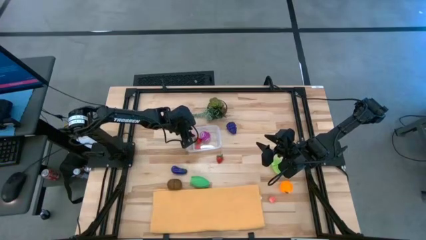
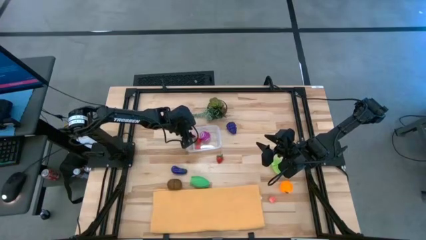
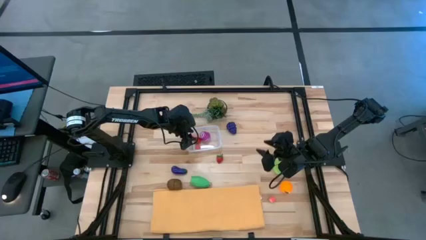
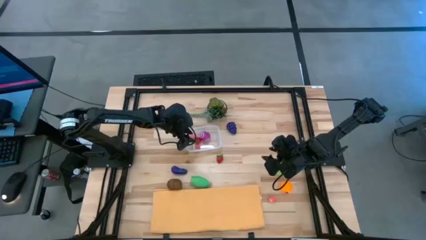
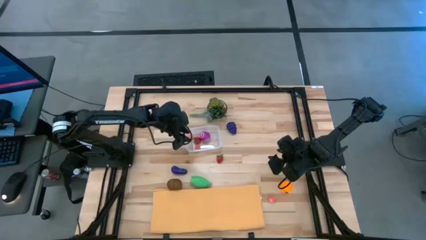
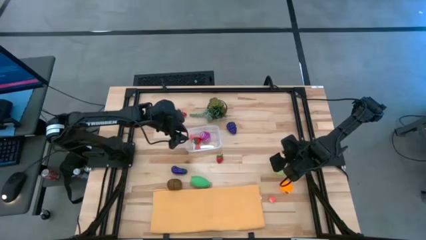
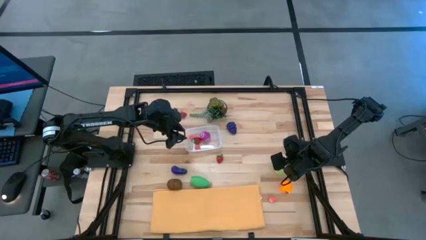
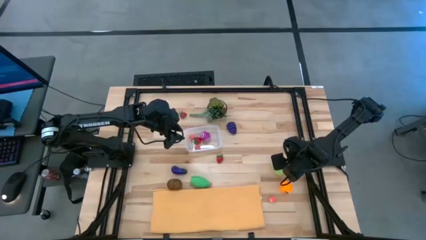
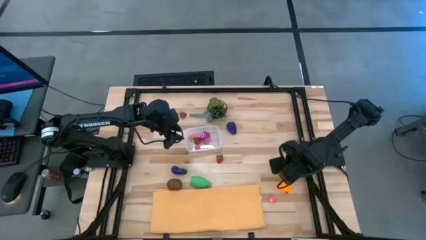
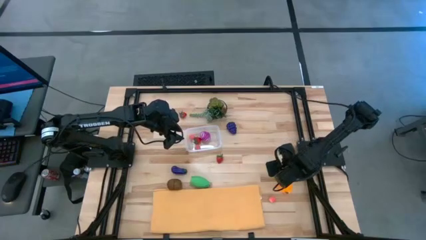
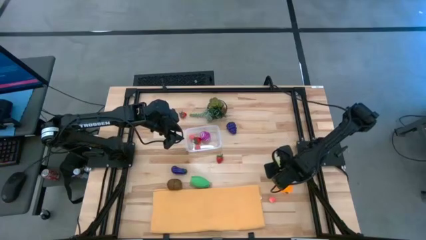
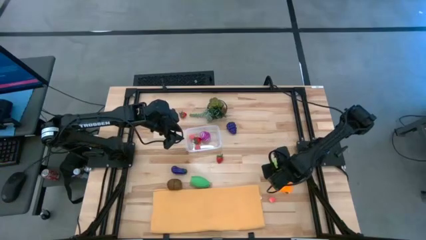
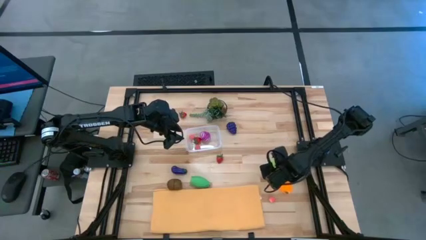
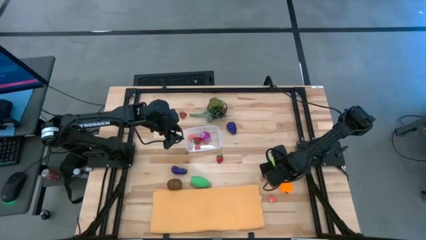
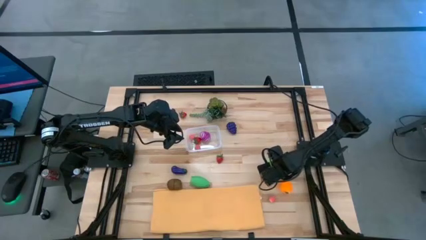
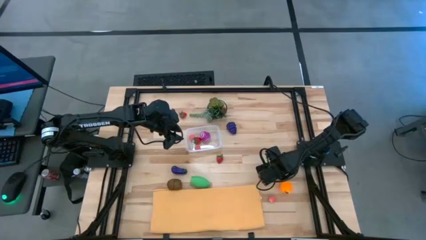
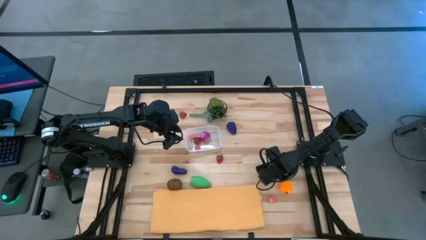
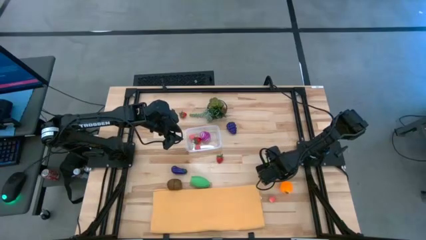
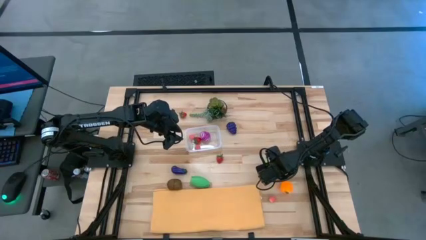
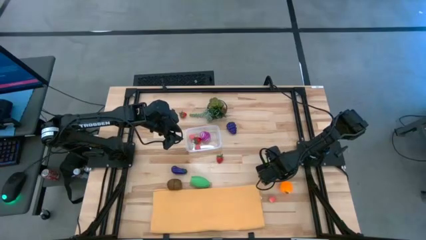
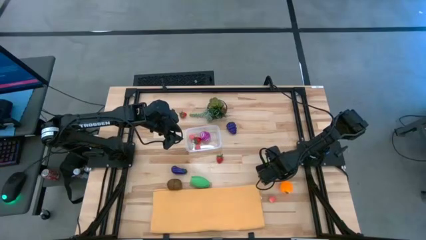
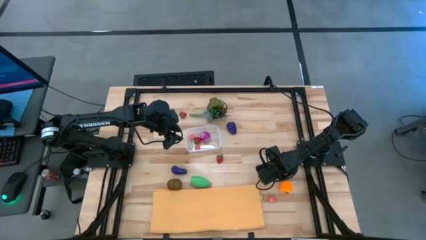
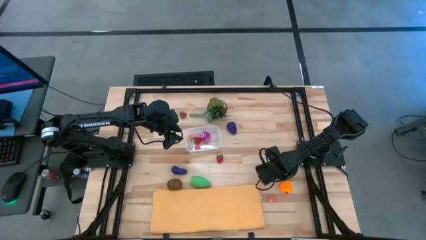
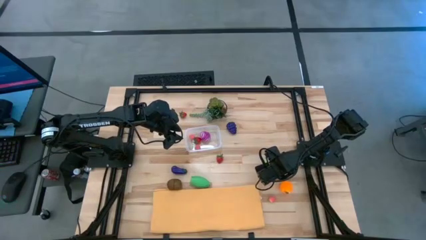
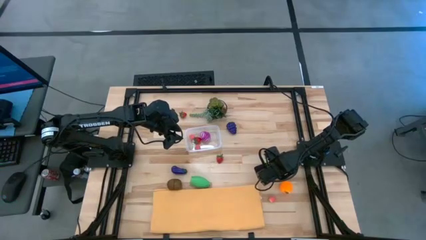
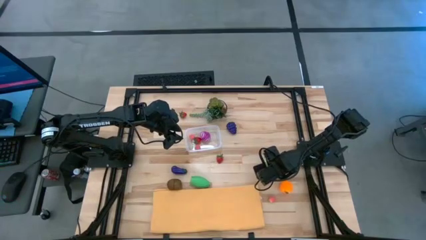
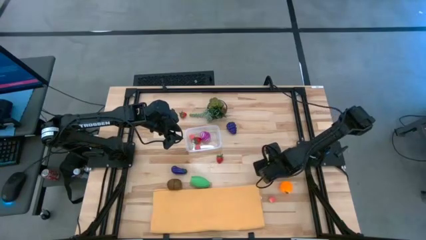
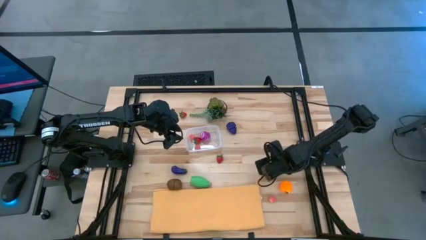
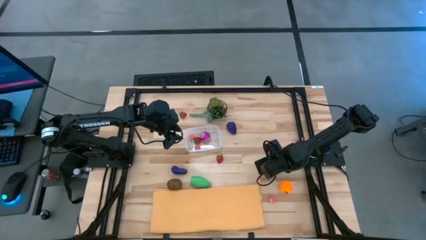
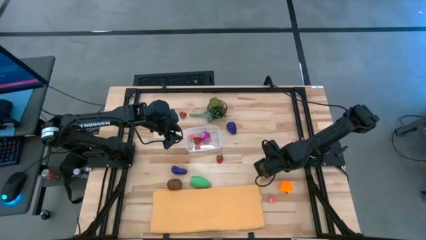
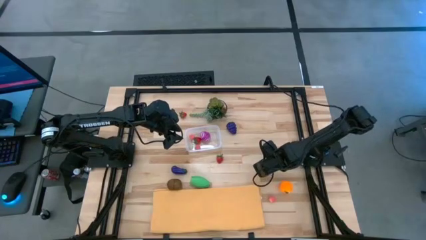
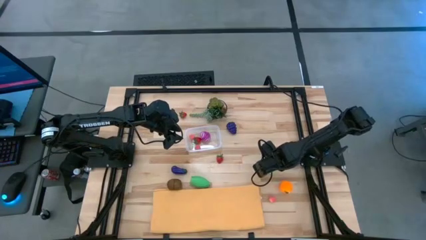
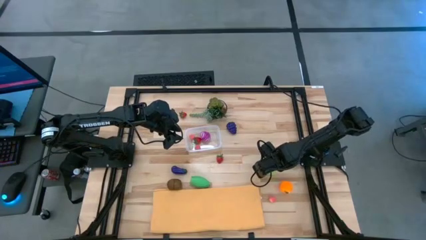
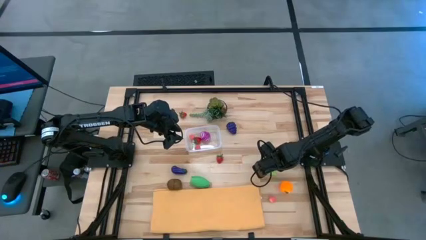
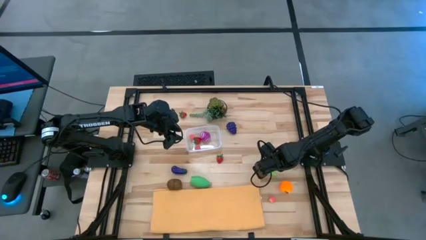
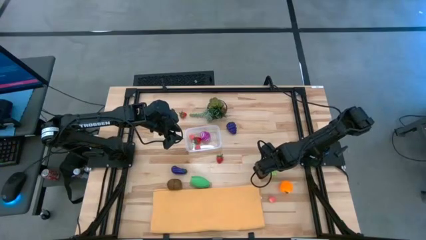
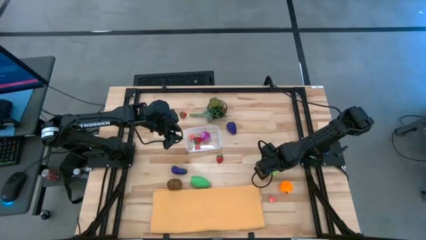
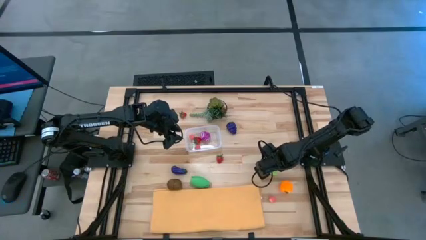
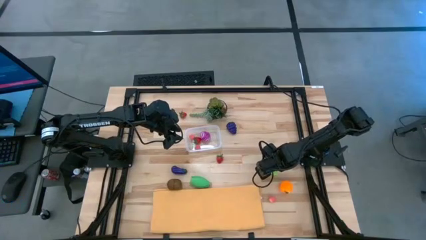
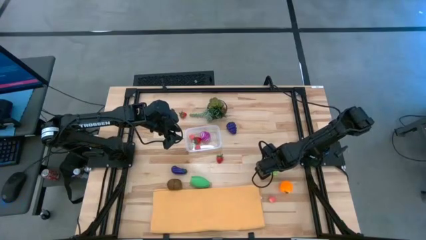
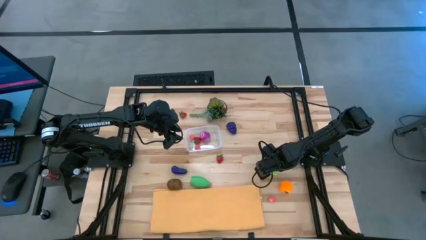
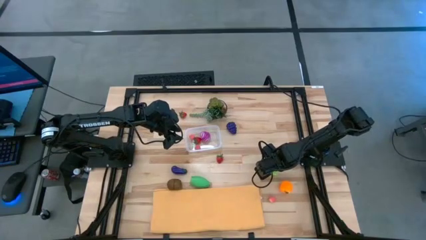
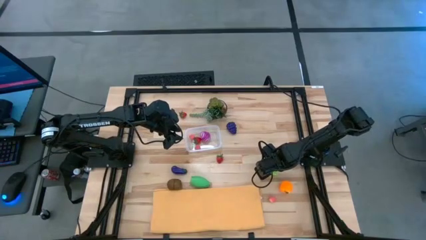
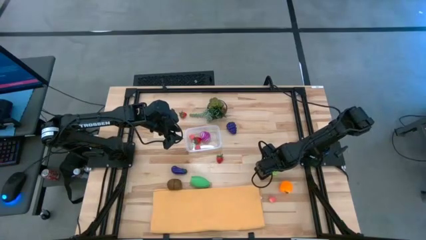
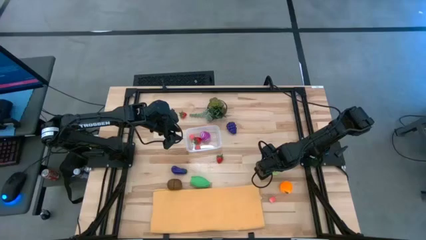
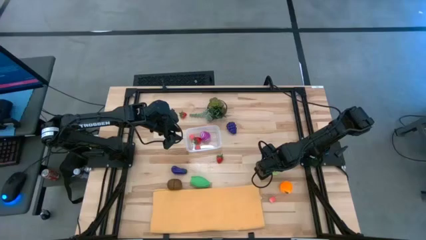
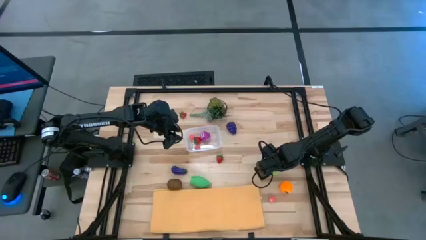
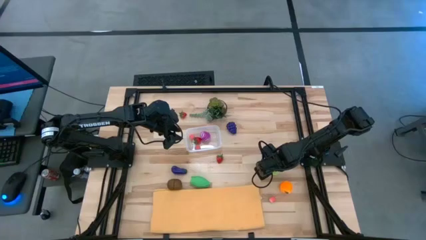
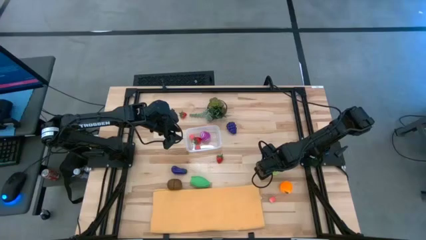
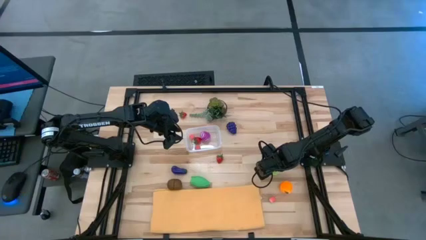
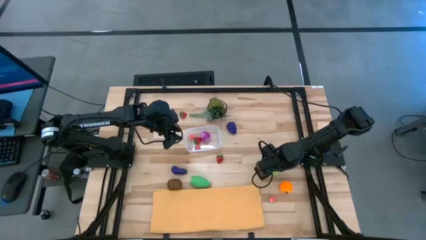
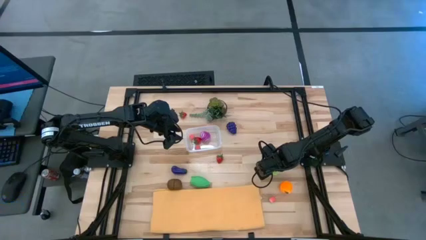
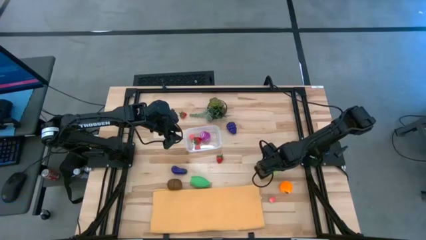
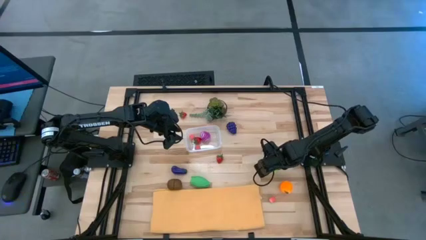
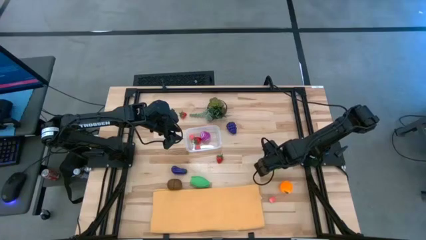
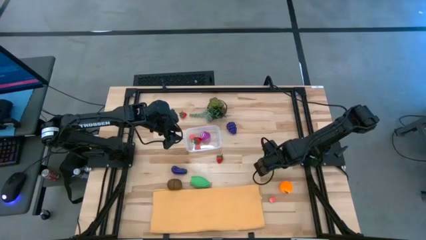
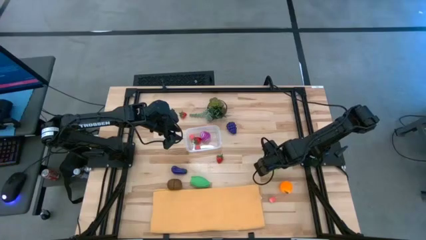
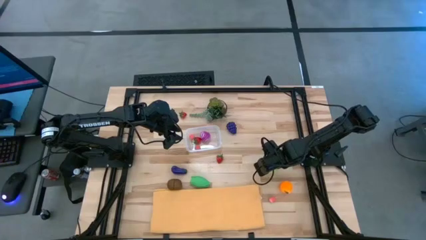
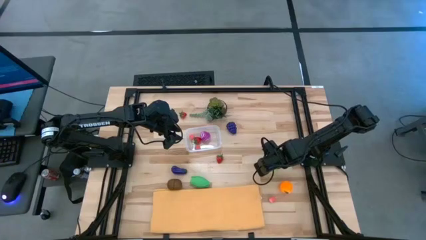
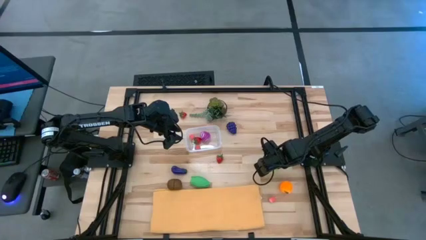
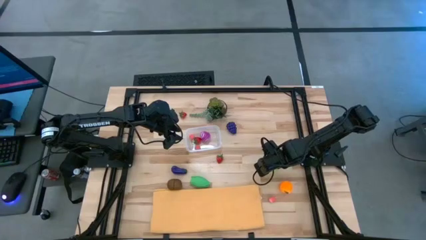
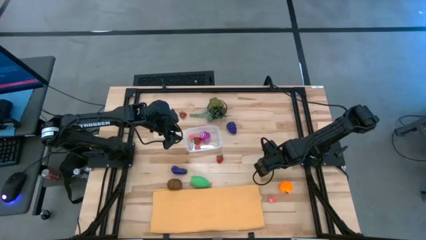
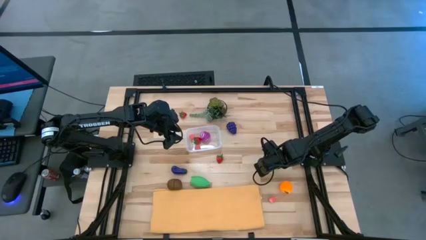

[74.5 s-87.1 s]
Task: Pick and placing Produce into tupperware
Put the green starfruit into the transparent bin

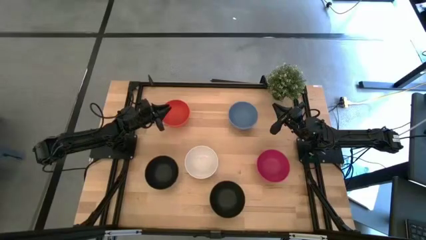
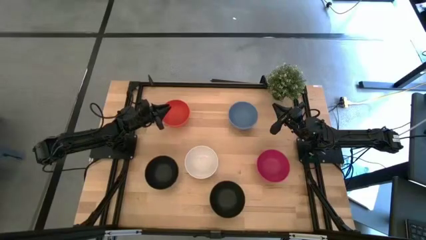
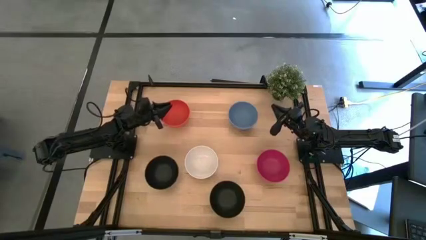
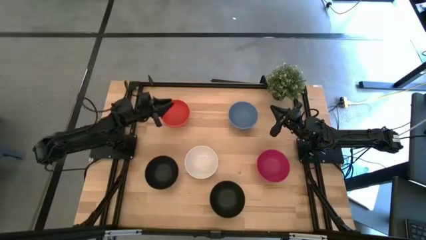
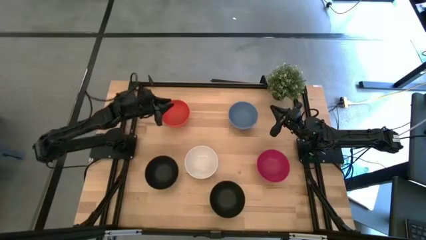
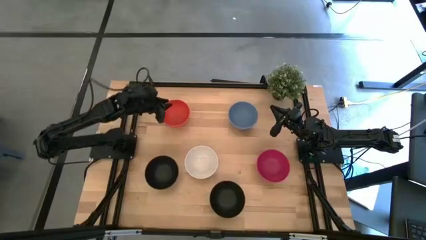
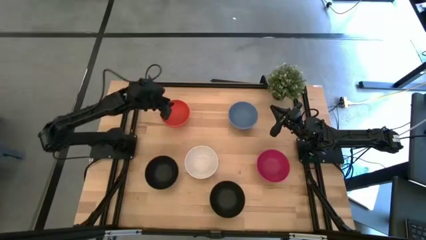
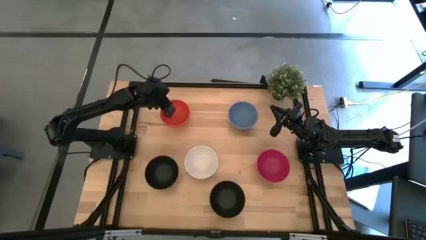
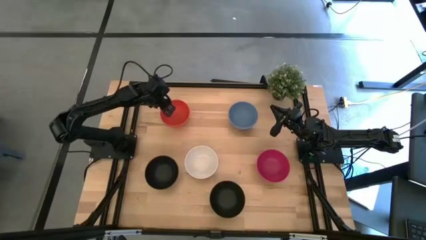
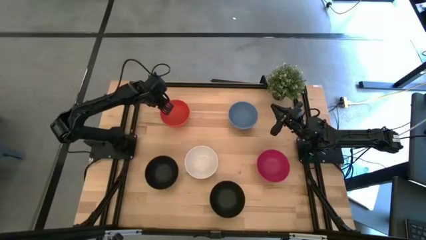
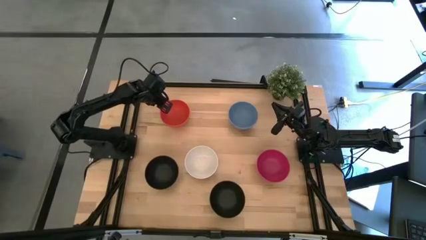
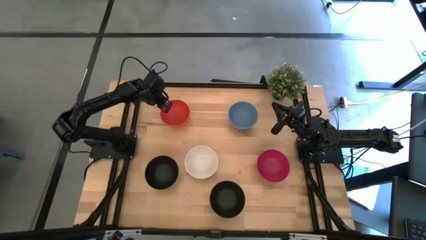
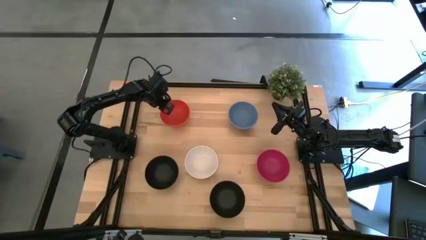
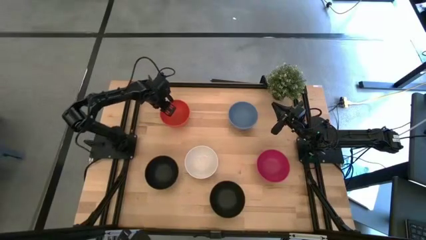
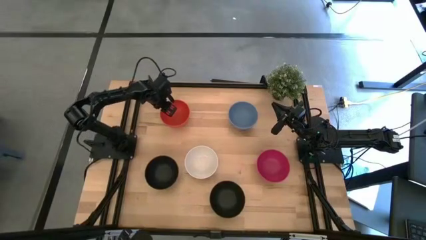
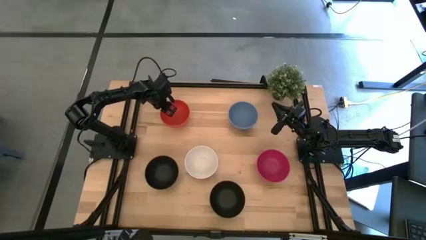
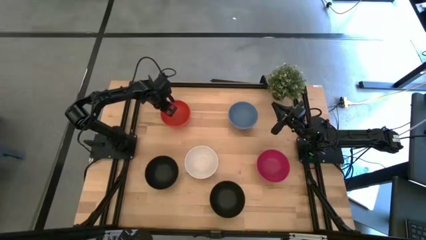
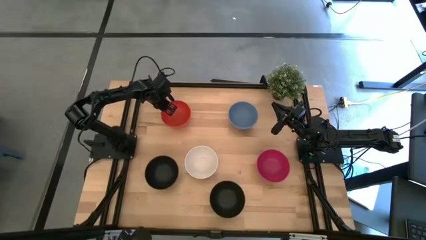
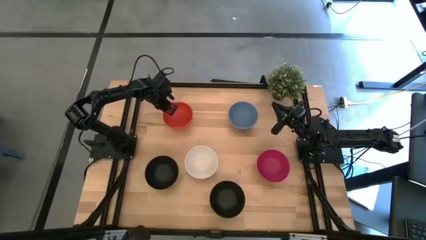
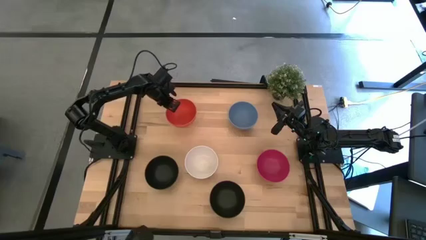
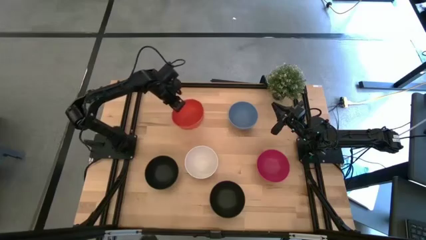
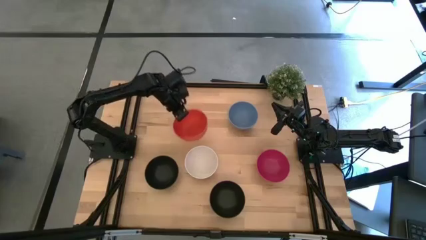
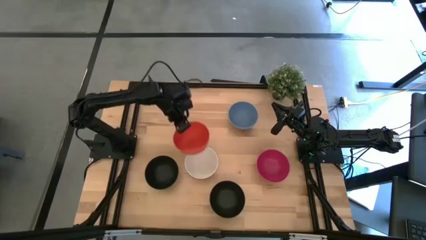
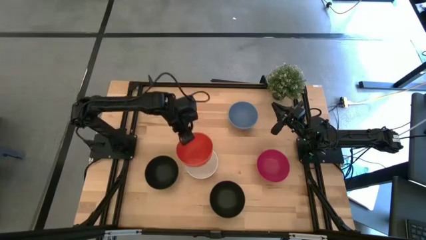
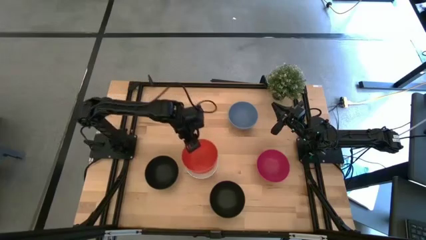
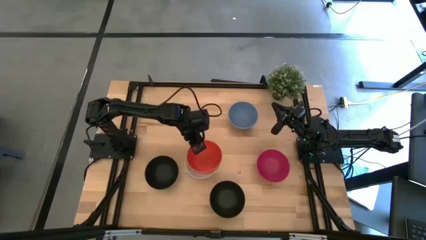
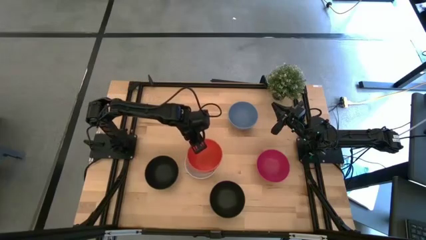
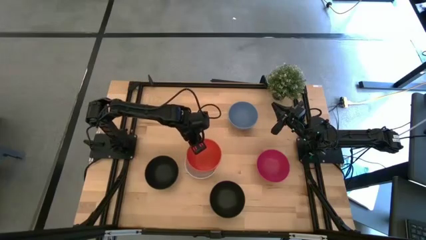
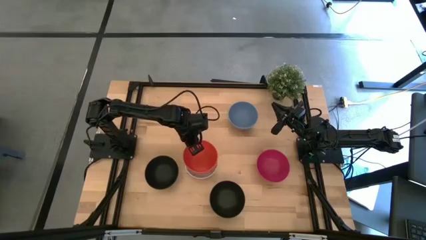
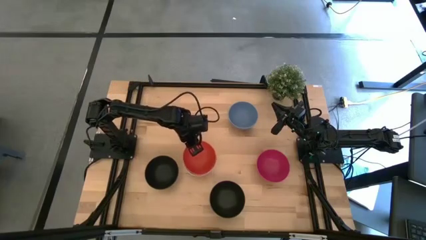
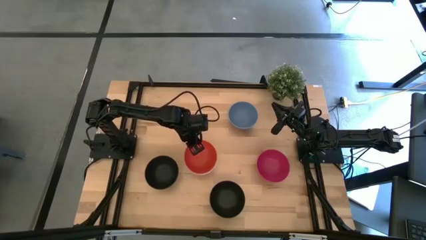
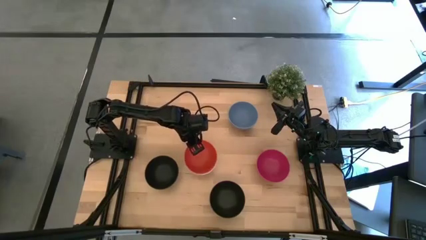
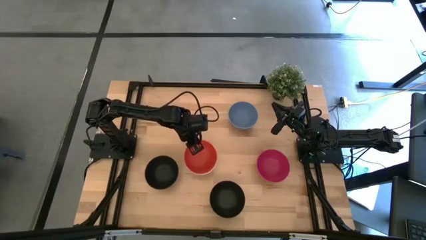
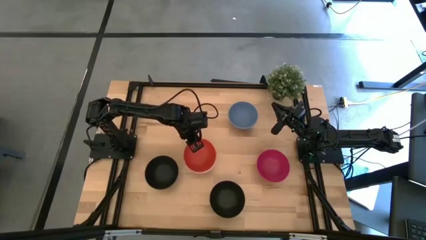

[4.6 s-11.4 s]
Task: Nest bowls inside each other
Stack the orange bowl on top of the white bowl
